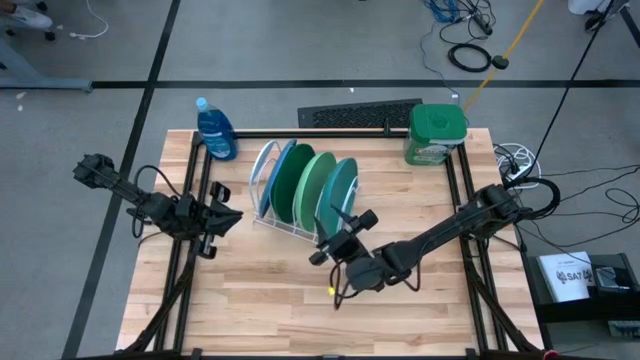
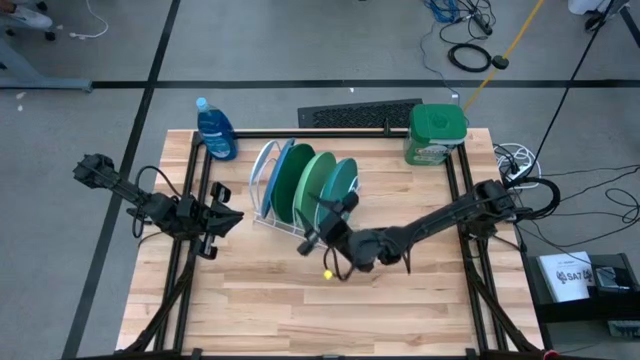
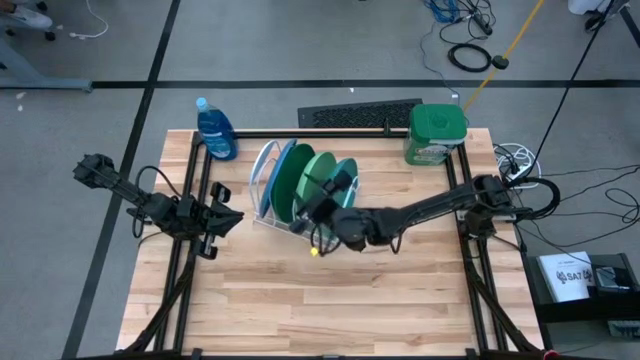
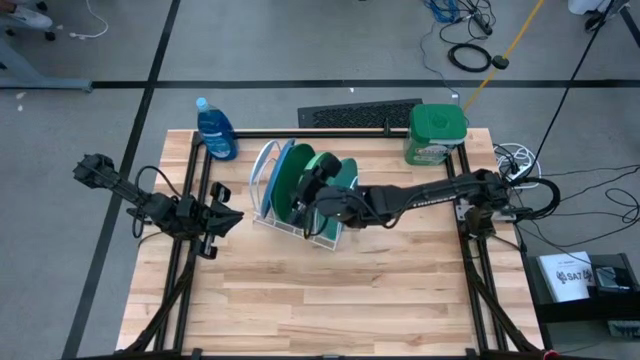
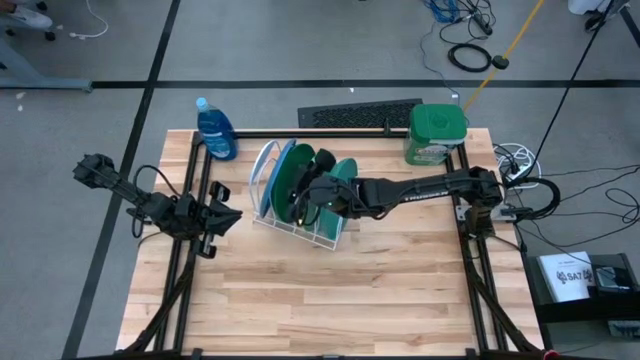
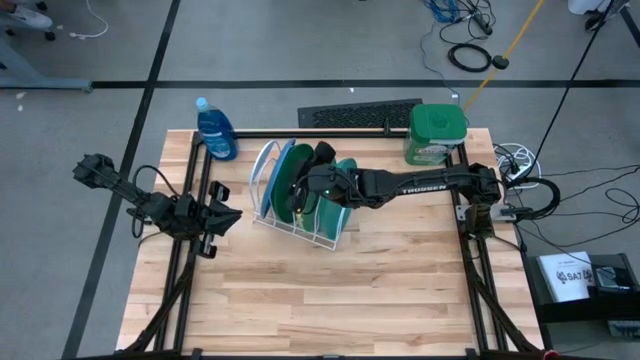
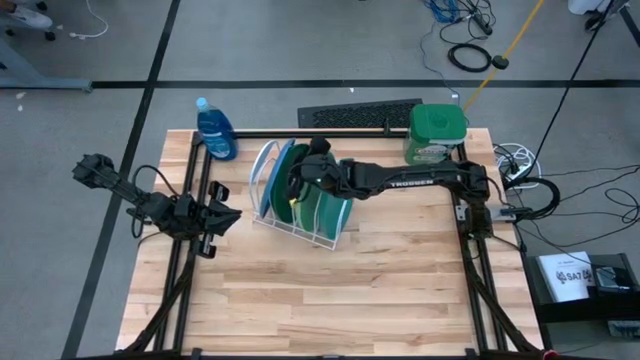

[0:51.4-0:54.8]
Task: Sort dishes
Adjust the blue plate on the dish rack

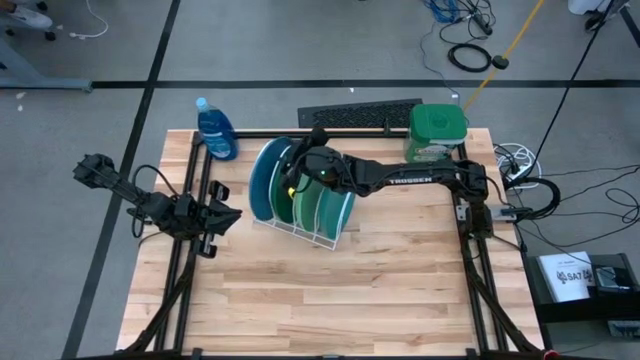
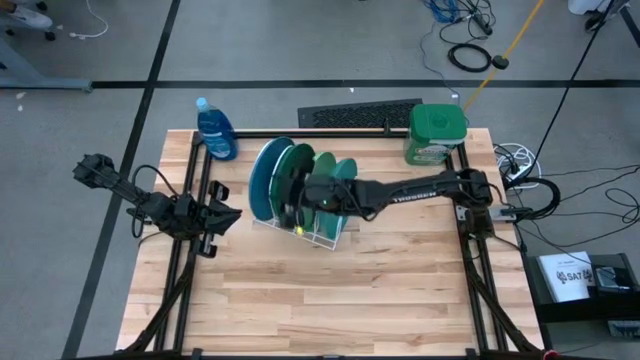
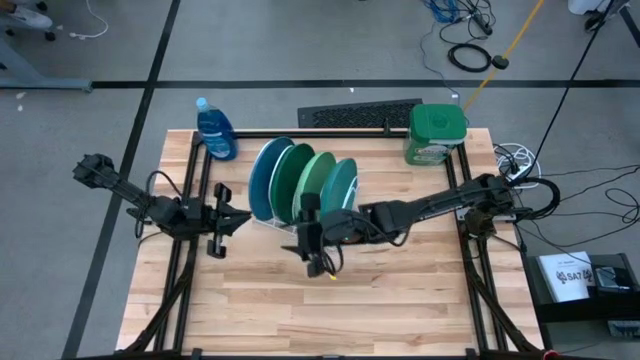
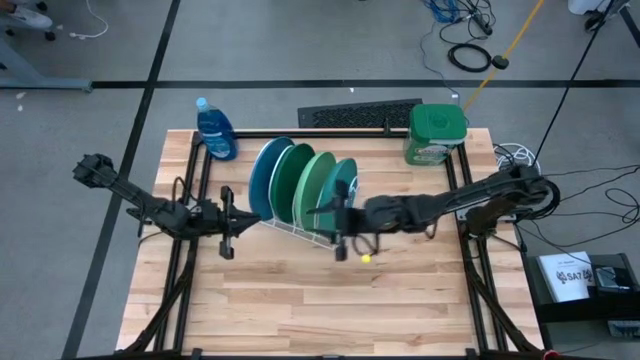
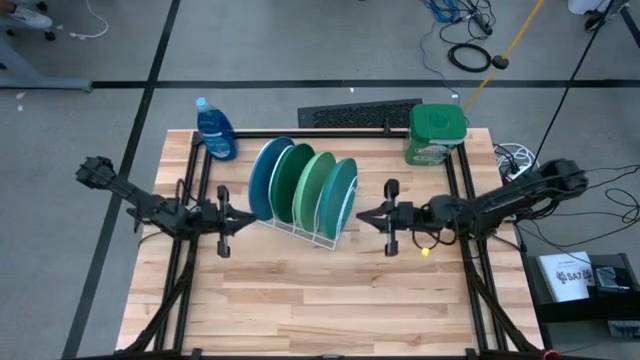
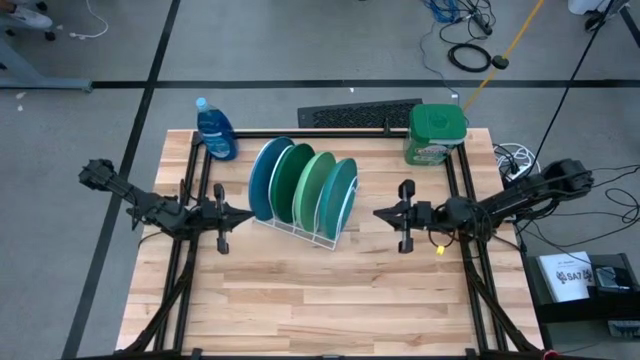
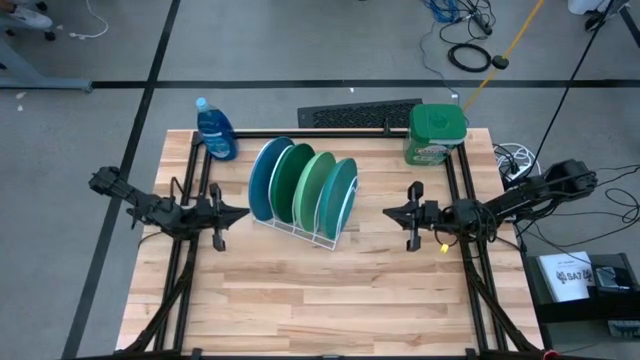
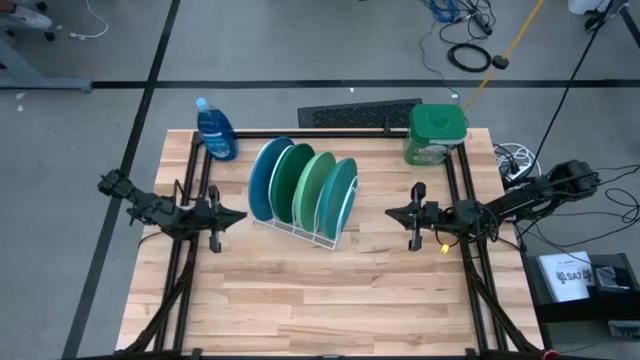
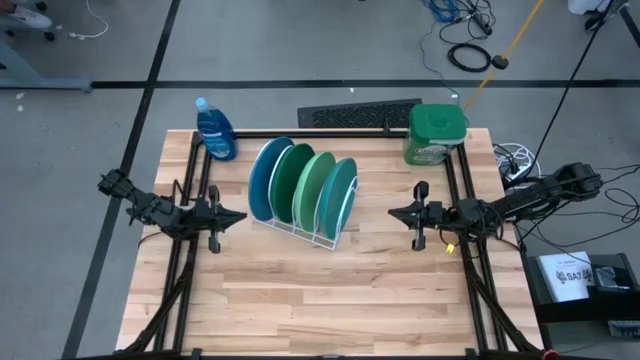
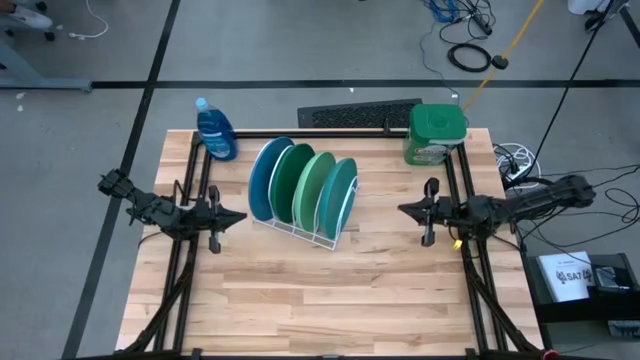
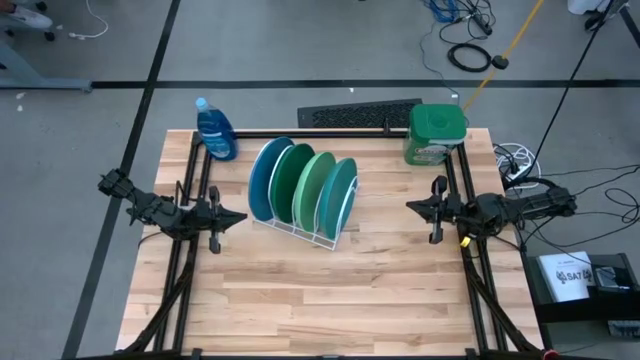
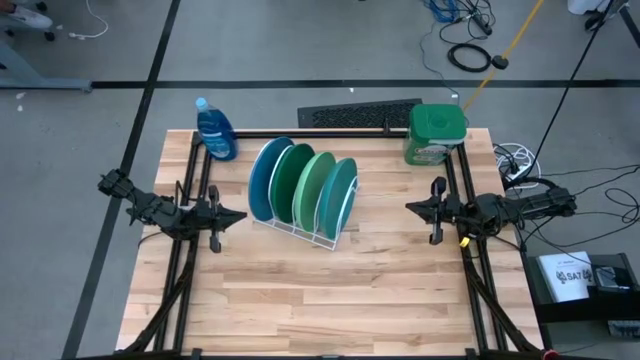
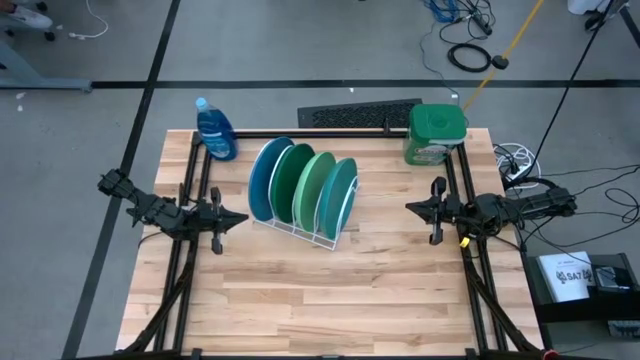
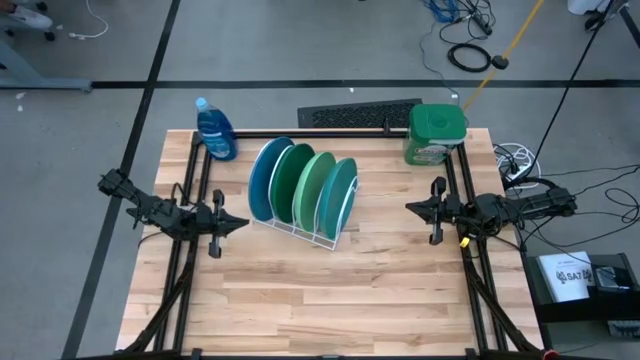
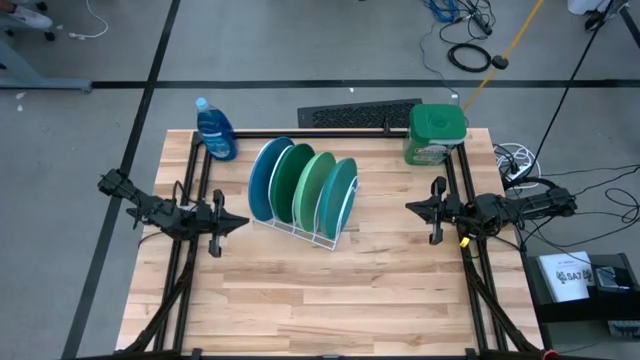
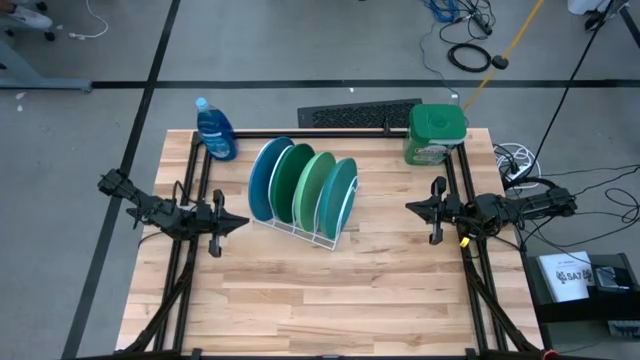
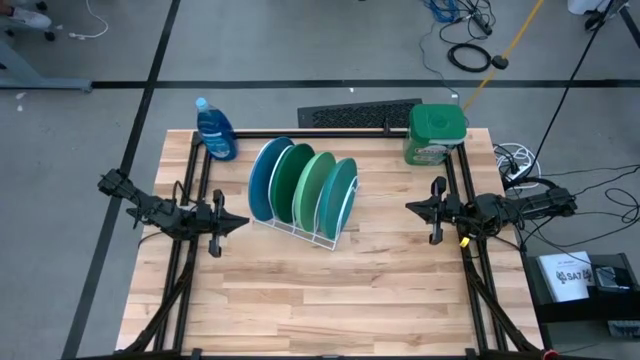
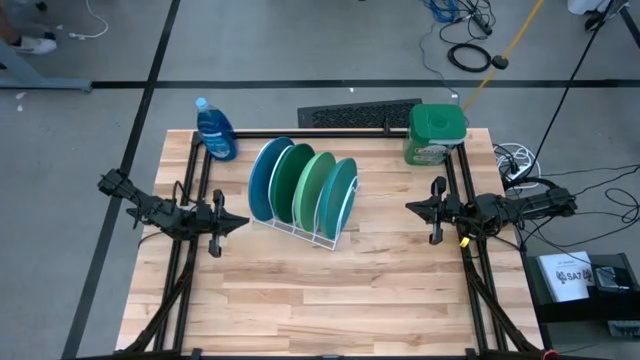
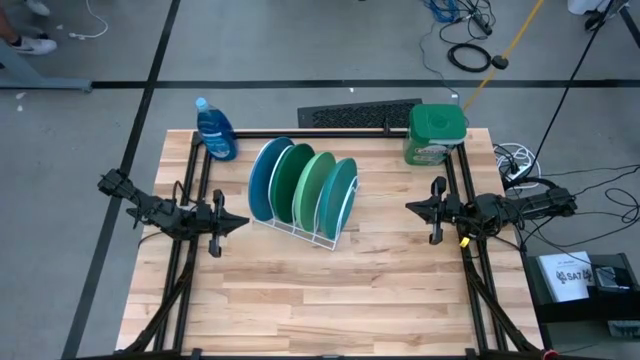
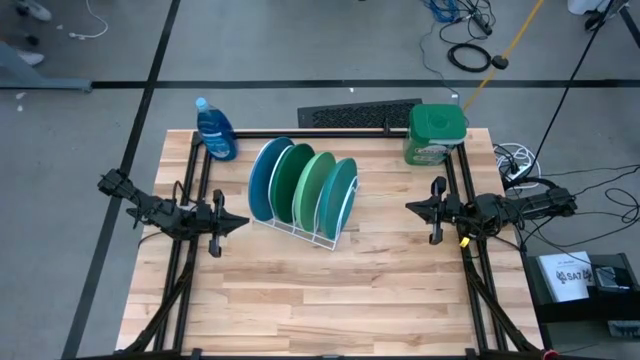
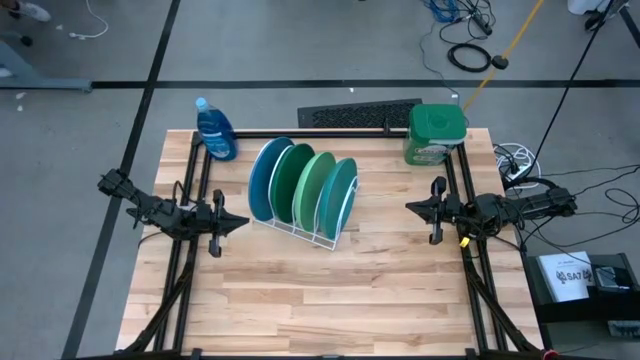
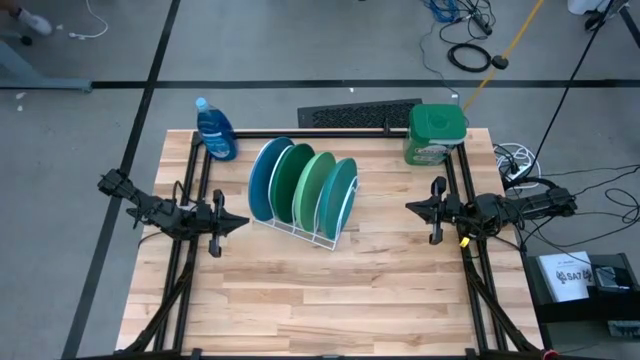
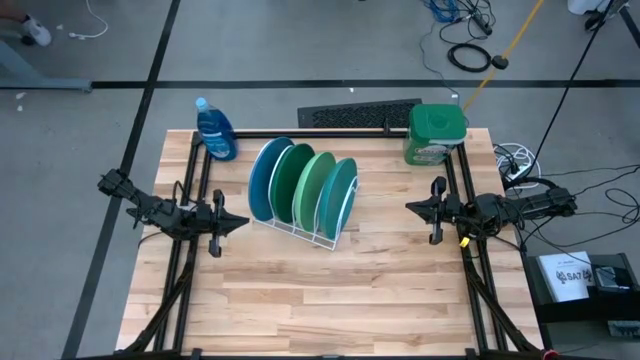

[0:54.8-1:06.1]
Return to Home Position
